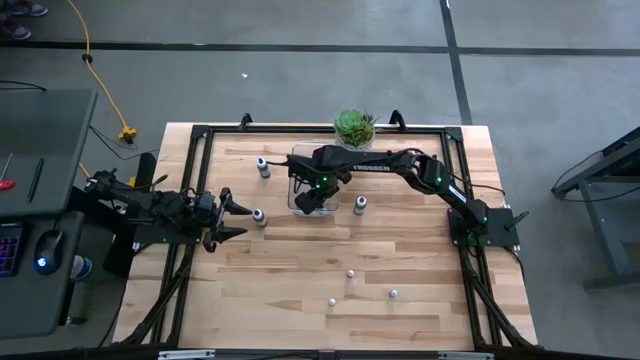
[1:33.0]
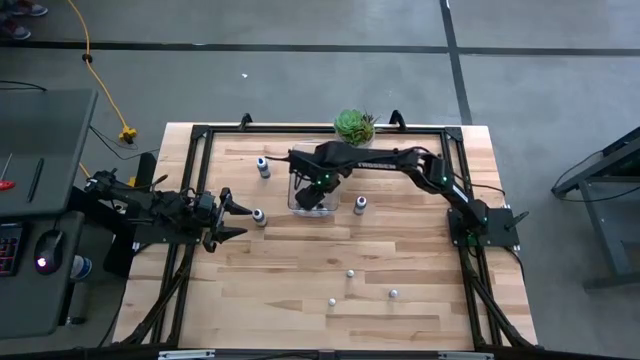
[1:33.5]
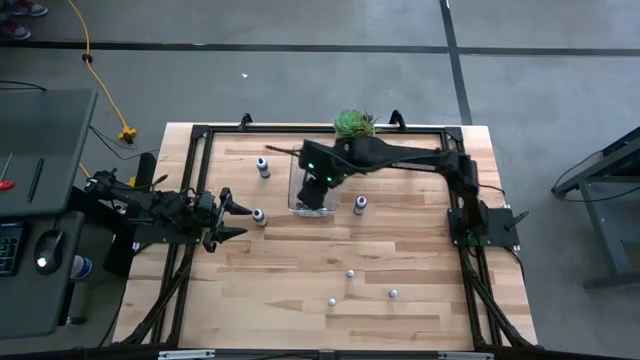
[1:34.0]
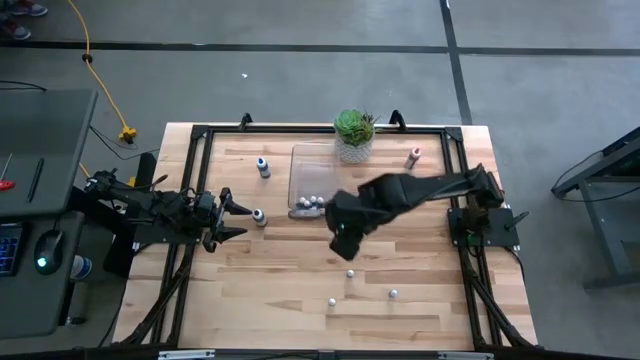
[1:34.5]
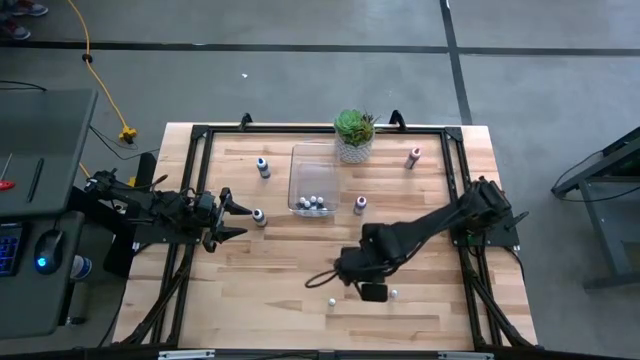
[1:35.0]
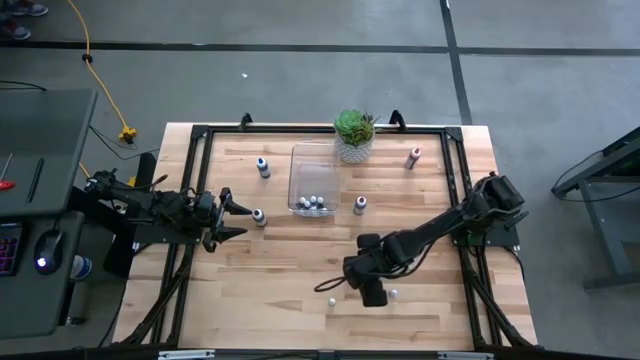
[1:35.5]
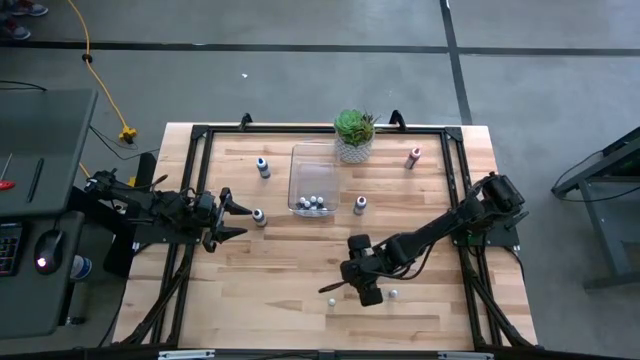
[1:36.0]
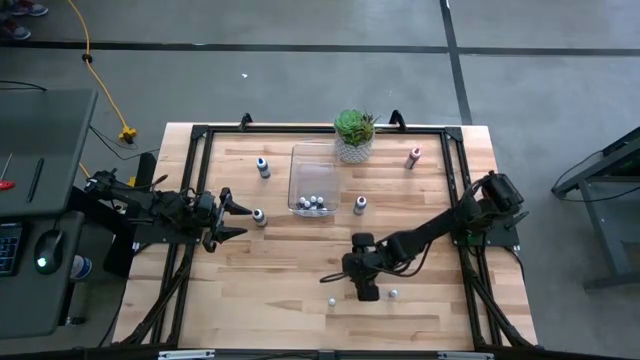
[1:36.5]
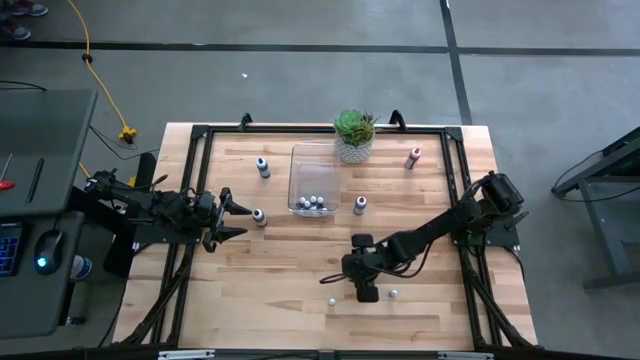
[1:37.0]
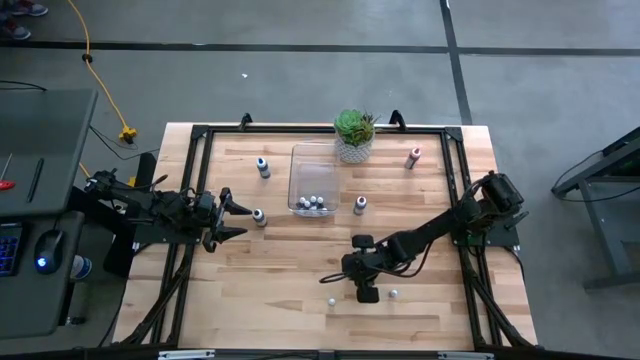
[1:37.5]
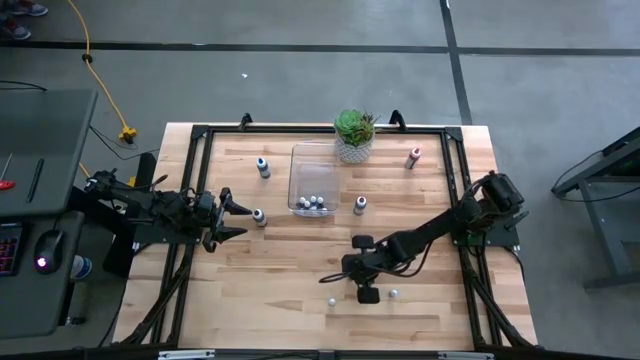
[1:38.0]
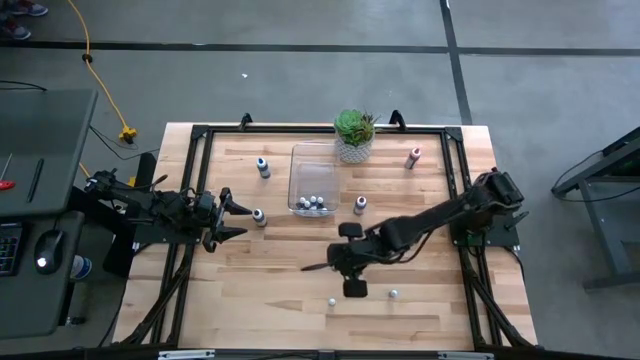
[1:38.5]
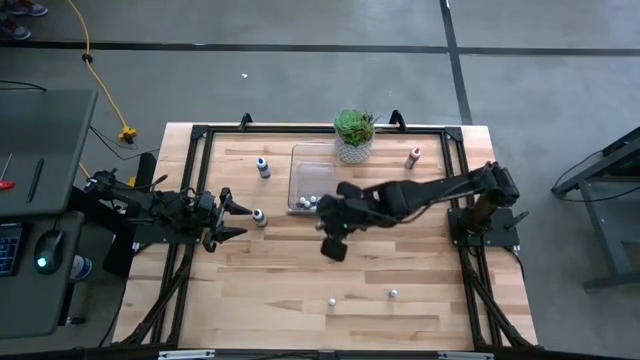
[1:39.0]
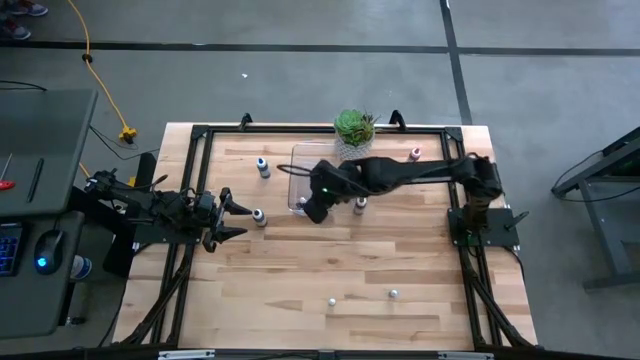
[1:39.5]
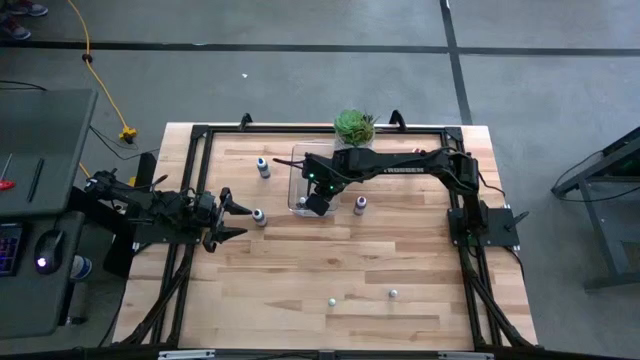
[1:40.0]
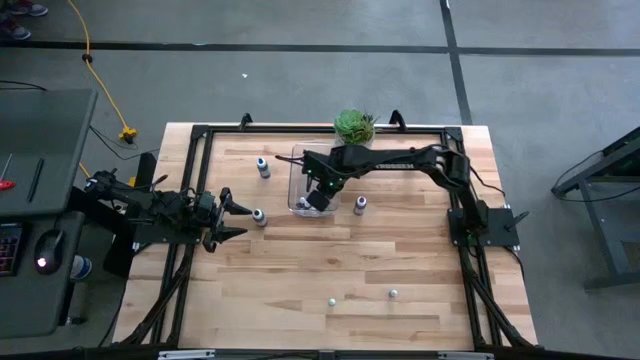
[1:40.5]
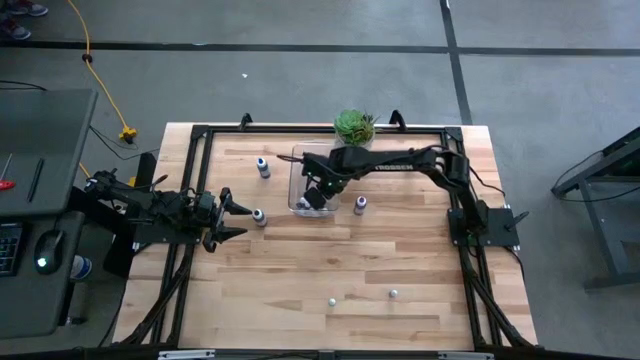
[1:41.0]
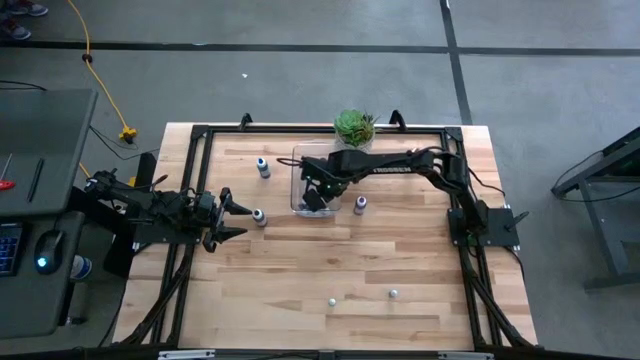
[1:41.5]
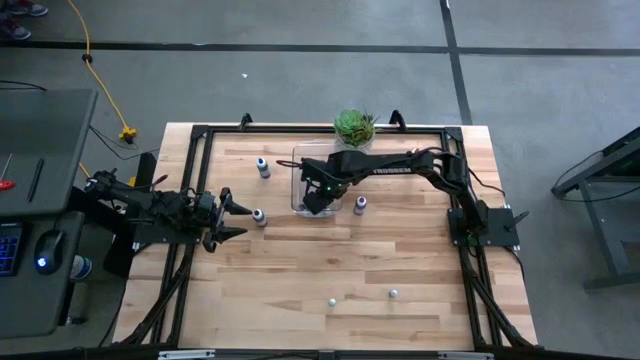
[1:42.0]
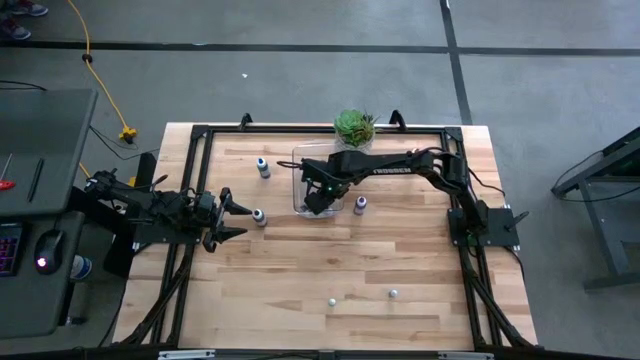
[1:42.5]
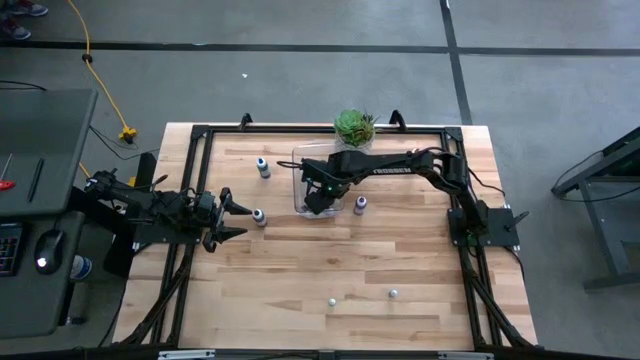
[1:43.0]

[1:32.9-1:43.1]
Task: Pick & Place food coloring
Put the small black food coloring bottle into the transparent bin

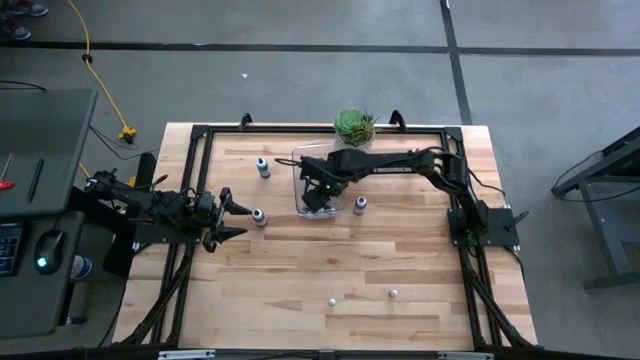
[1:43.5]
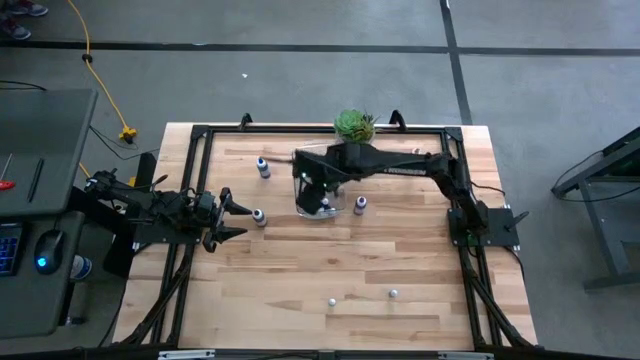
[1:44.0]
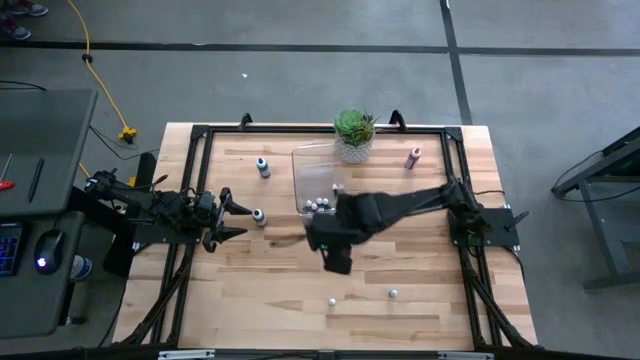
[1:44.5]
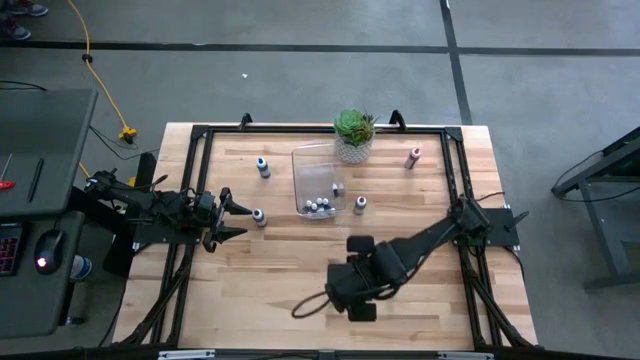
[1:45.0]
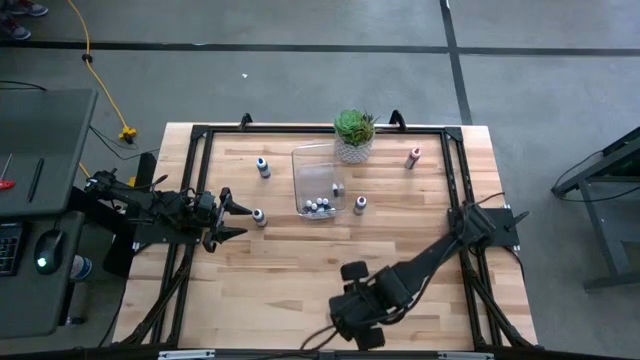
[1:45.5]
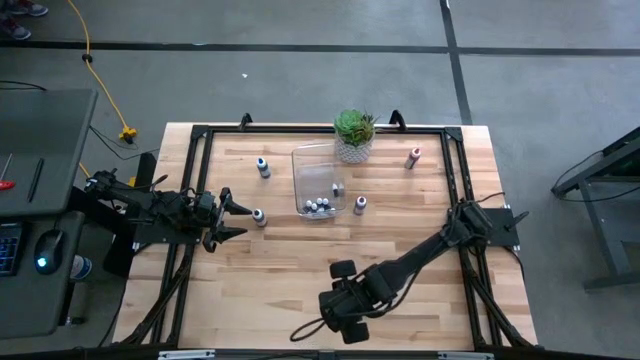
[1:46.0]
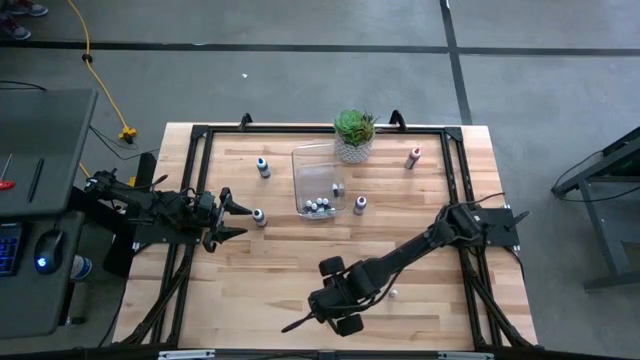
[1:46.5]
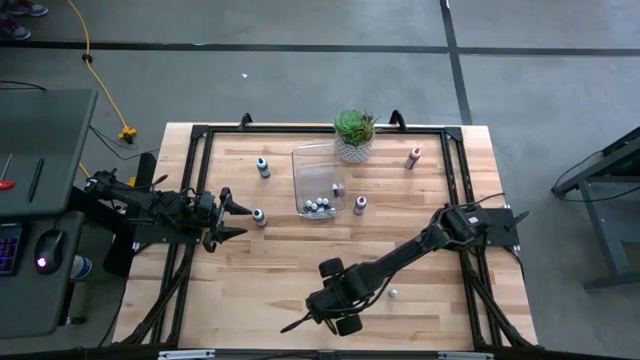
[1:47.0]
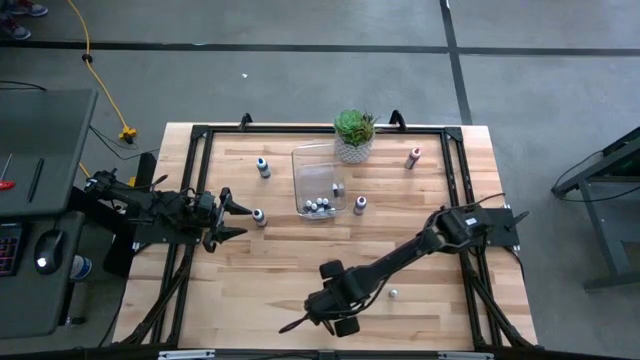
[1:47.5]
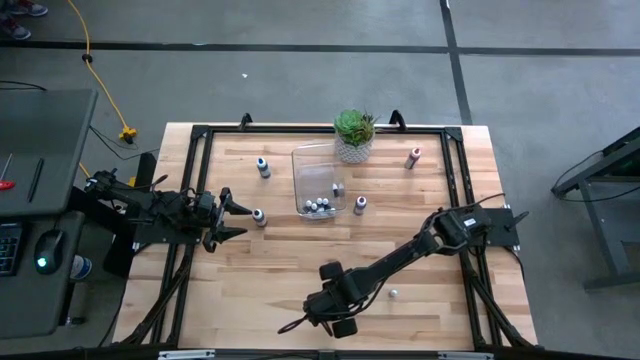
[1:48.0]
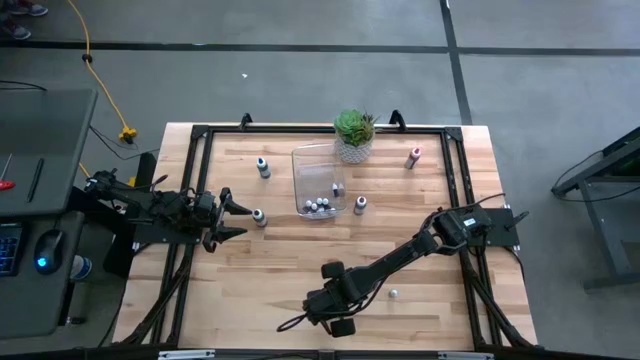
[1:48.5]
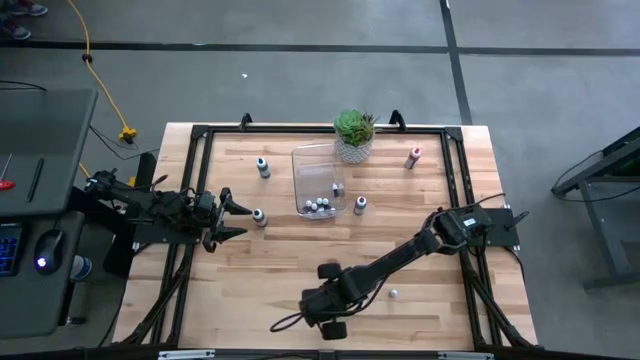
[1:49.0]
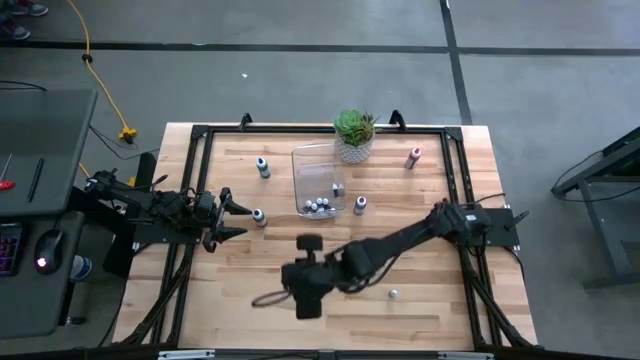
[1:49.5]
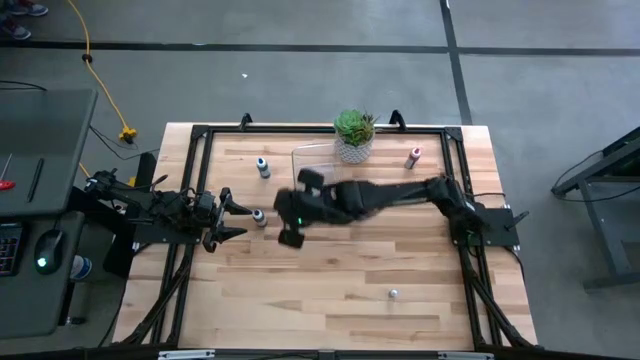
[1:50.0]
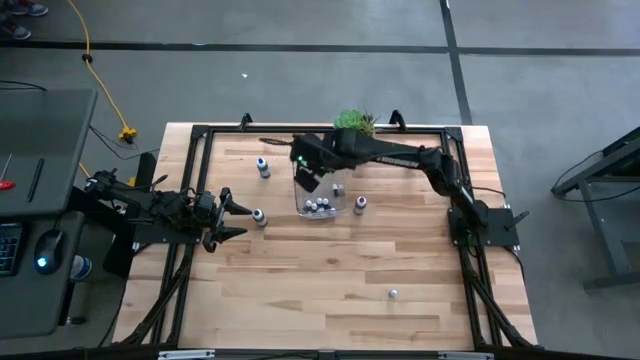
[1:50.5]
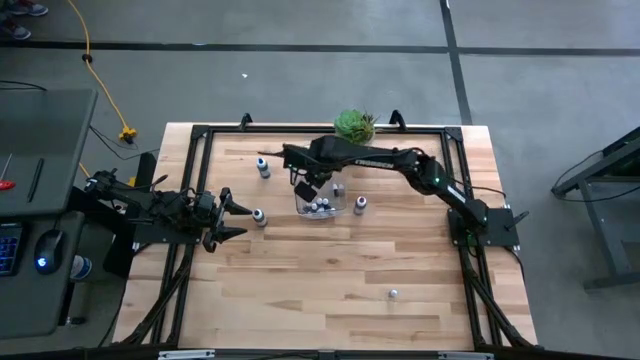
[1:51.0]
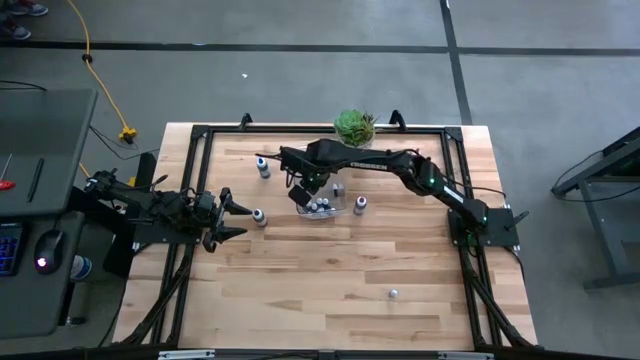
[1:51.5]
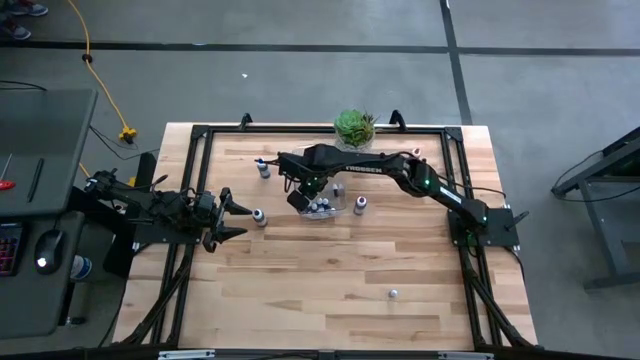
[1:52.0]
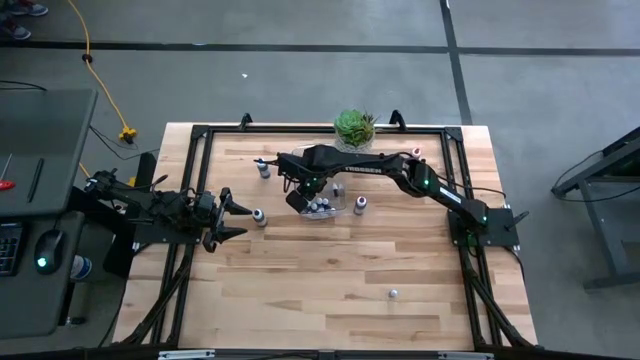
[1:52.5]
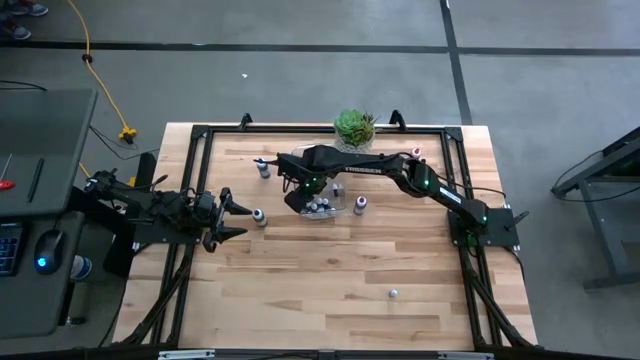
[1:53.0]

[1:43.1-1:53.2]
Put the small violet food coloring bottle into the transparent bin
